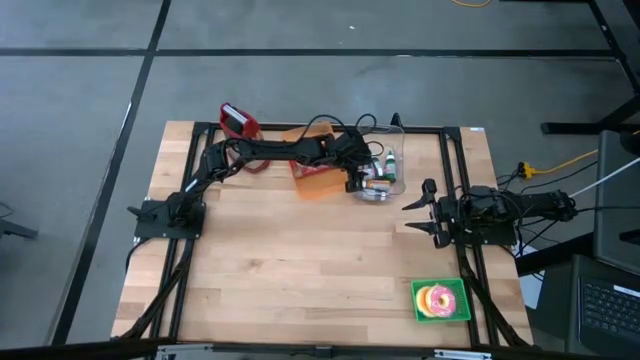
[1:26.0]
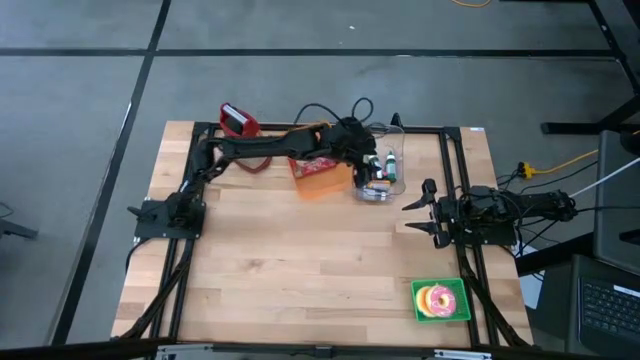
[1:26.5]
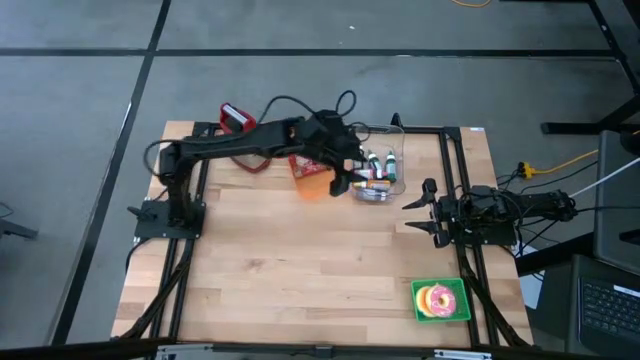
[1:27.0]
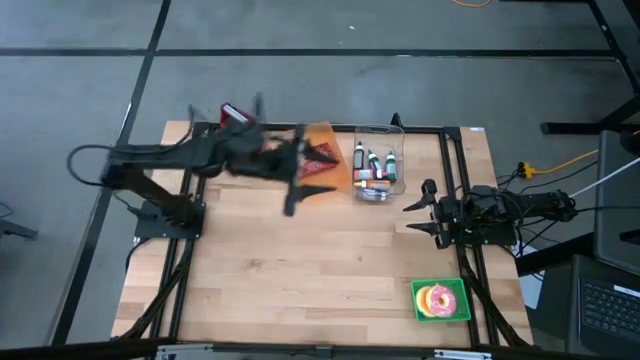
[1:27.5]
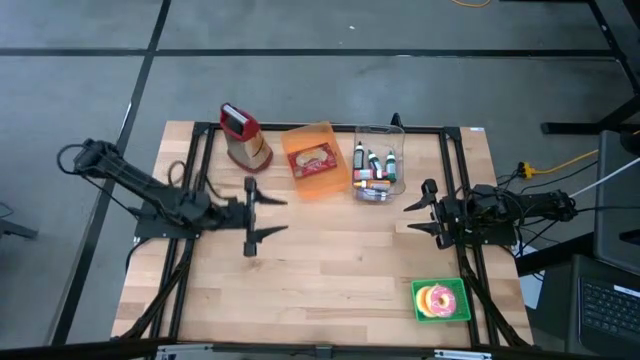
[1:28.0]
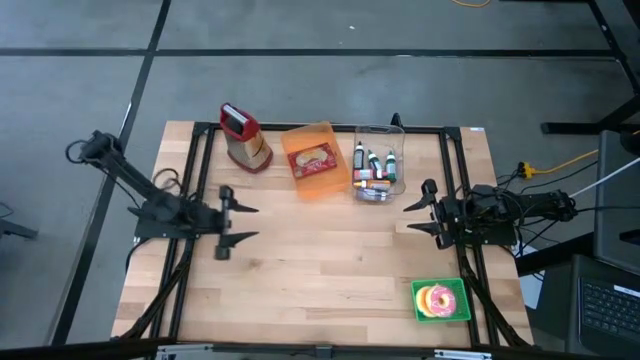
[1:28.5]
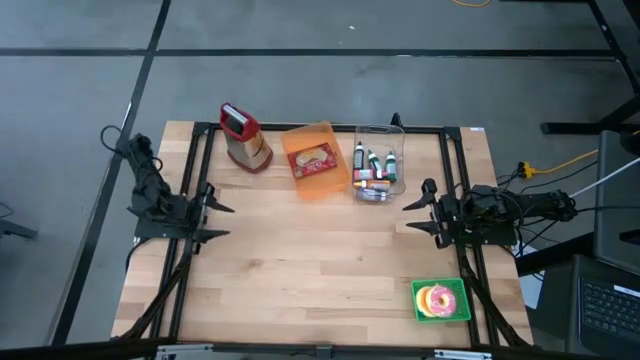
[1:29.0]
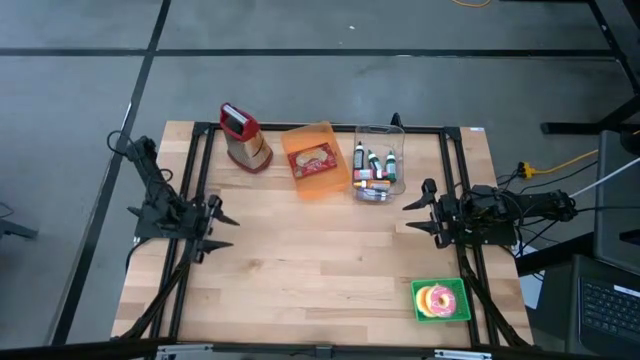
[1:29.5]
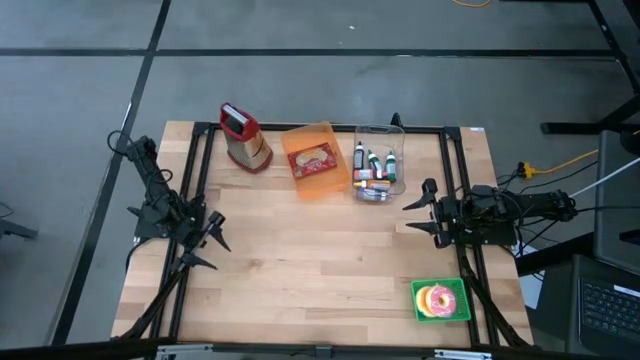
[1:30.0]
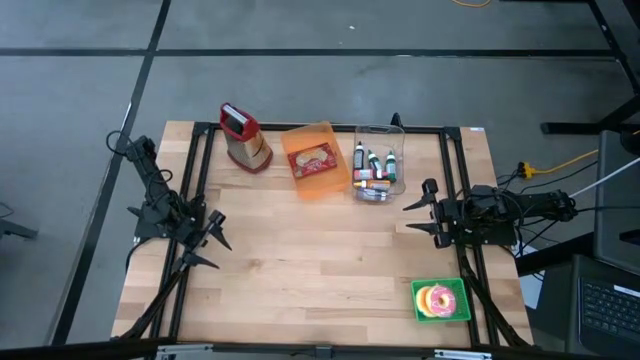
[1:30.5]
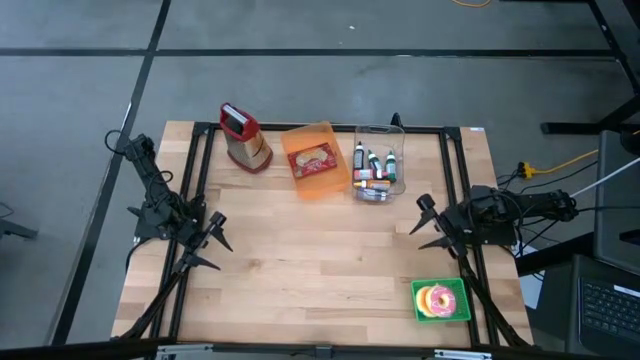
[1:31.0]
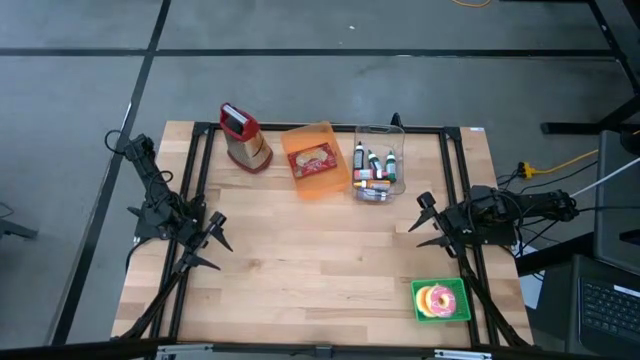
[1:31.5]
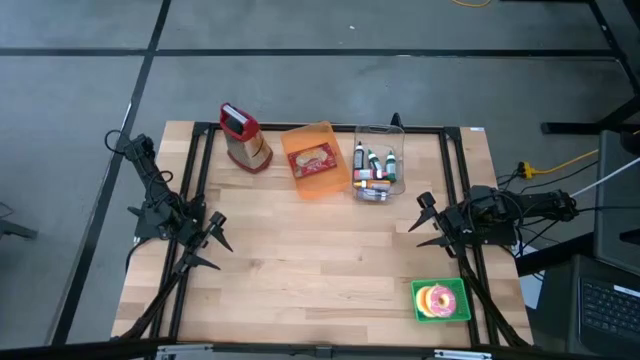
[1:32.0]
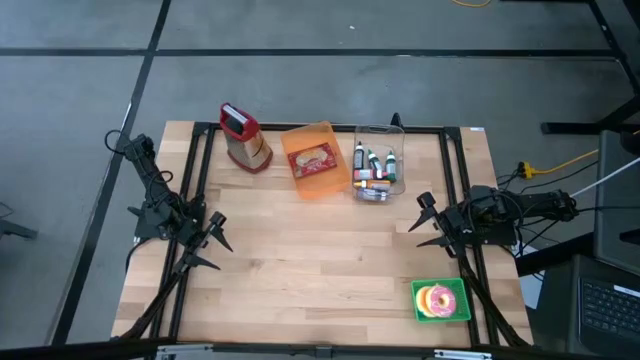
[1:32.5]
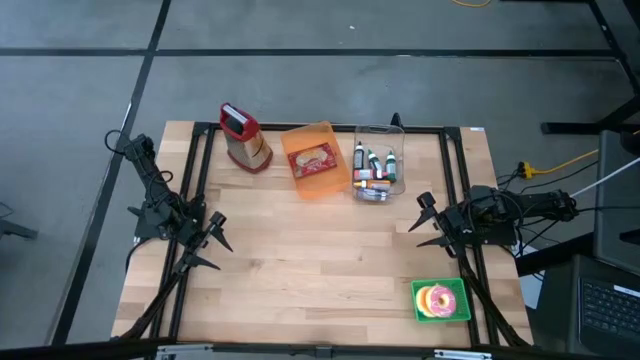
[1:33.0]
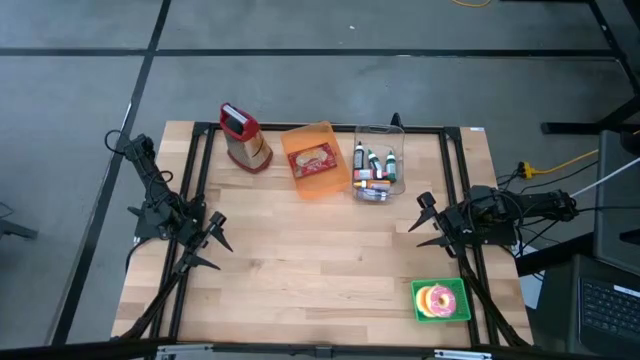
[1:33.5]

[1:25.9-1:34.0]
Return to Home Position

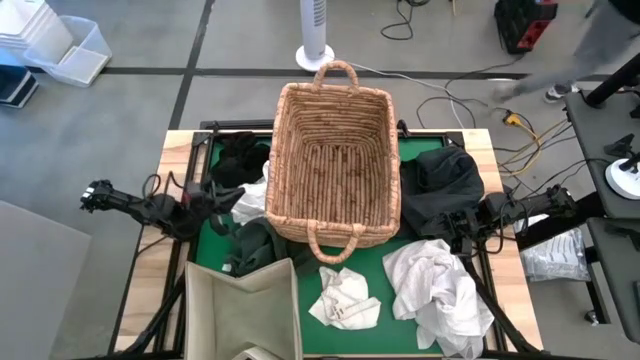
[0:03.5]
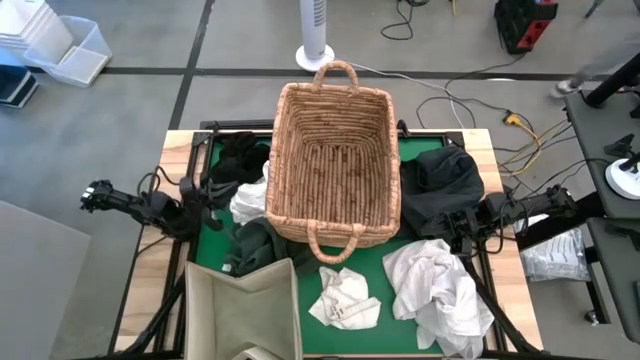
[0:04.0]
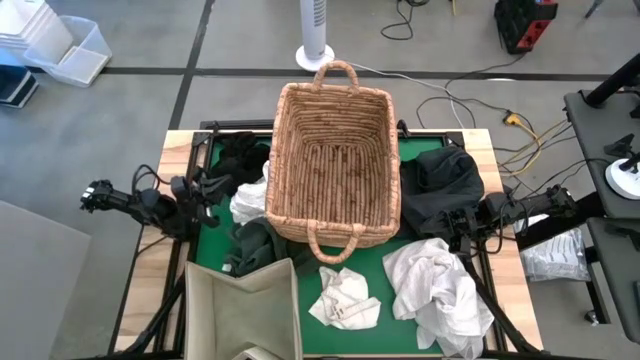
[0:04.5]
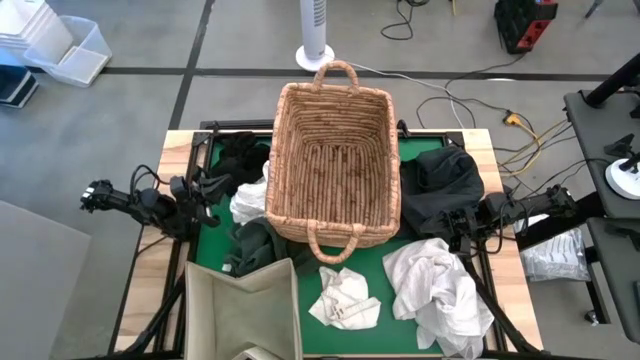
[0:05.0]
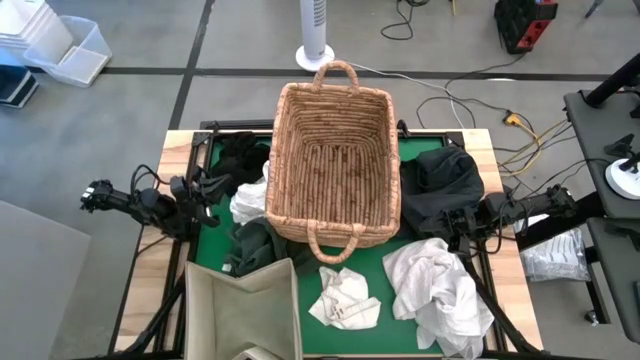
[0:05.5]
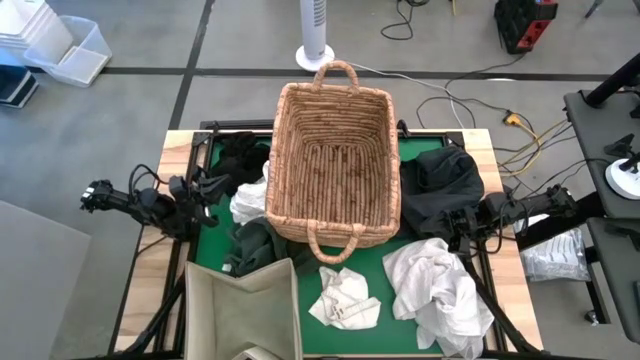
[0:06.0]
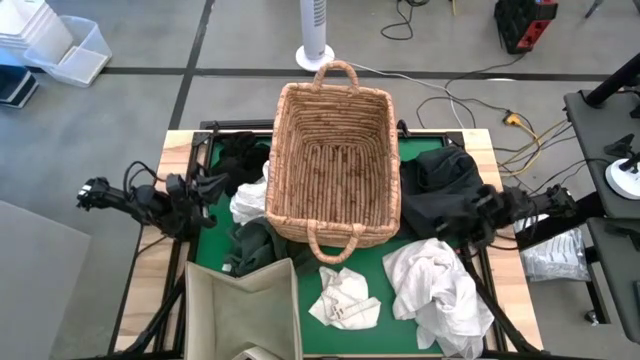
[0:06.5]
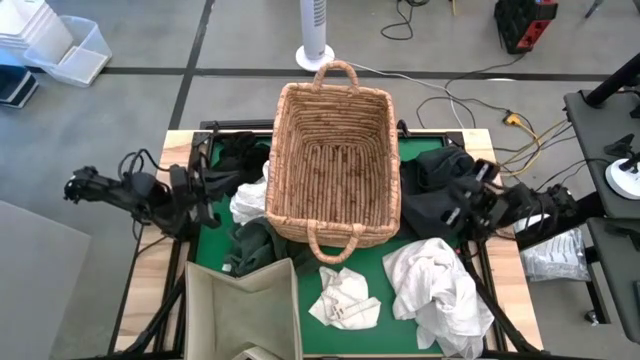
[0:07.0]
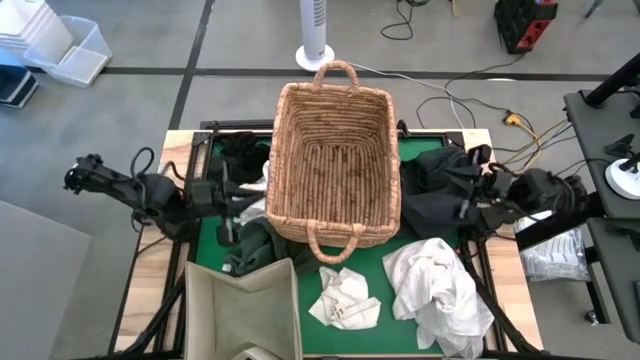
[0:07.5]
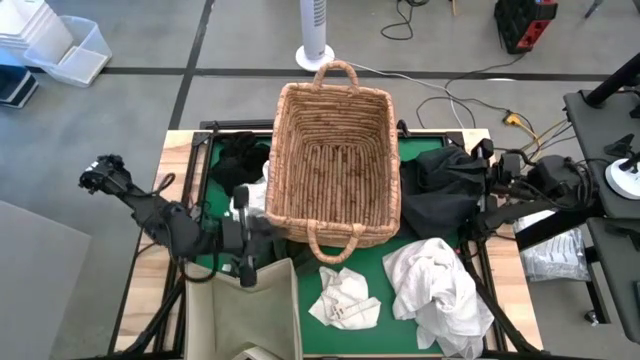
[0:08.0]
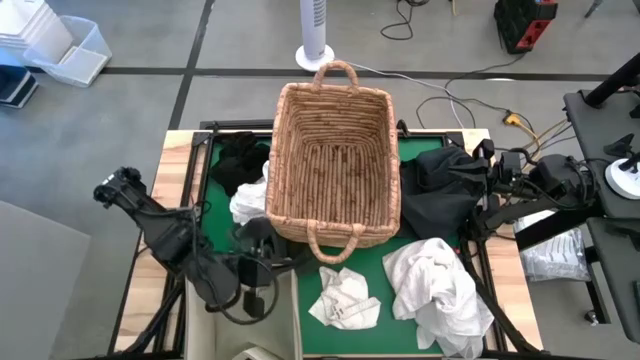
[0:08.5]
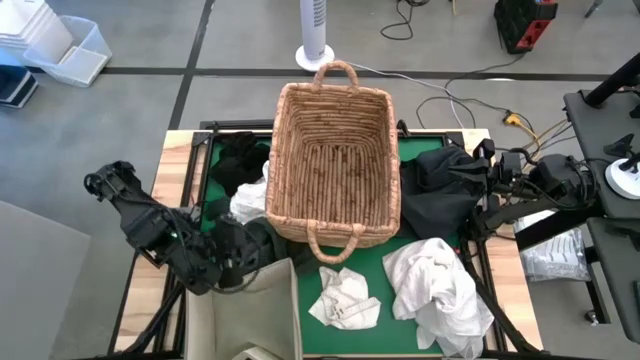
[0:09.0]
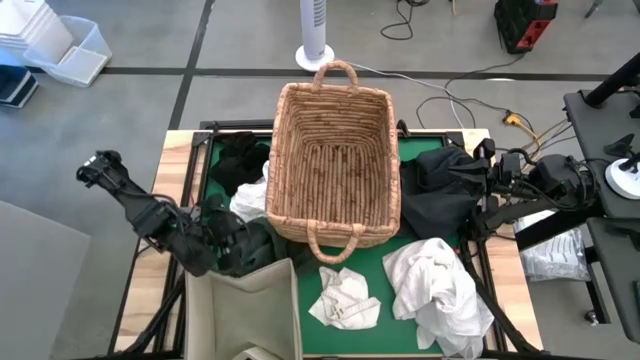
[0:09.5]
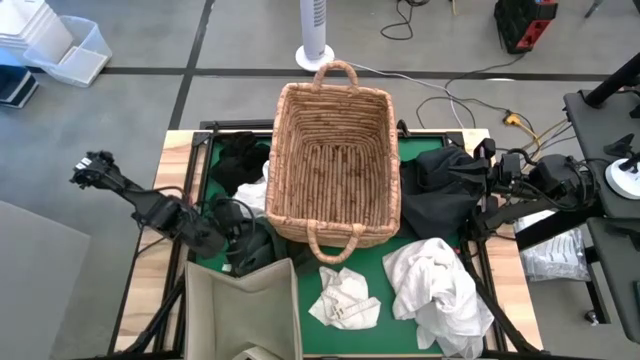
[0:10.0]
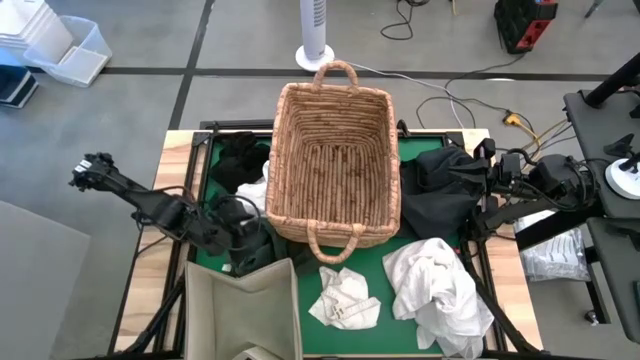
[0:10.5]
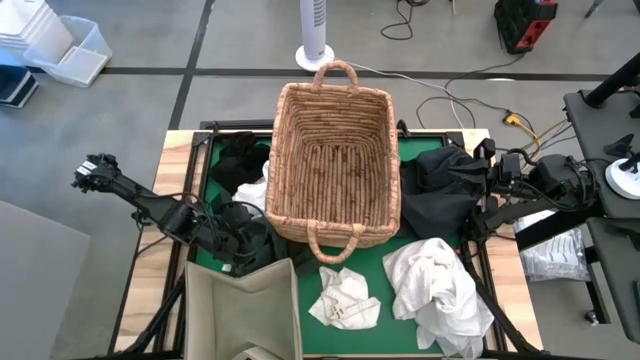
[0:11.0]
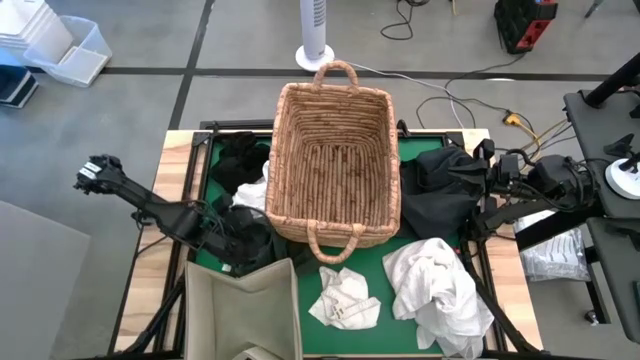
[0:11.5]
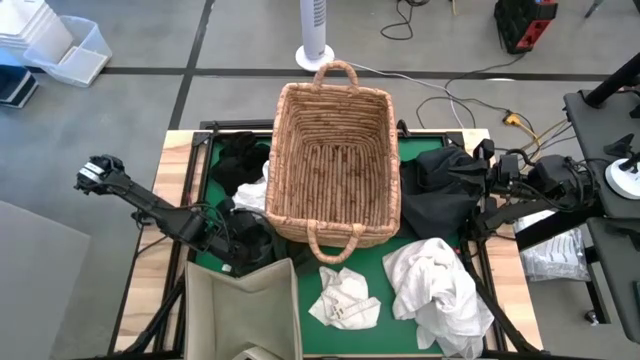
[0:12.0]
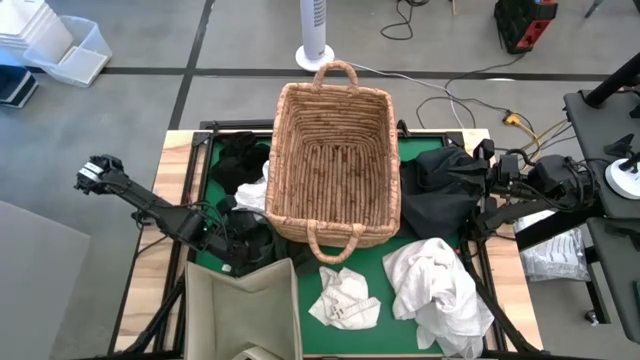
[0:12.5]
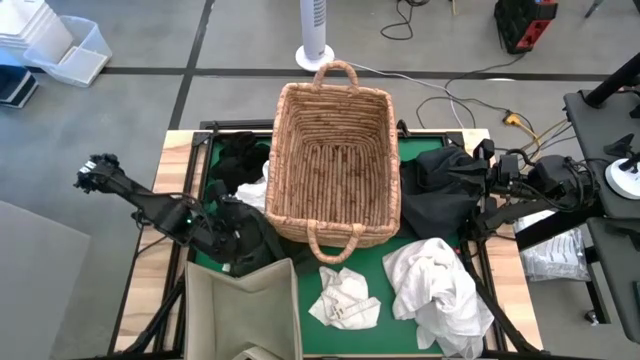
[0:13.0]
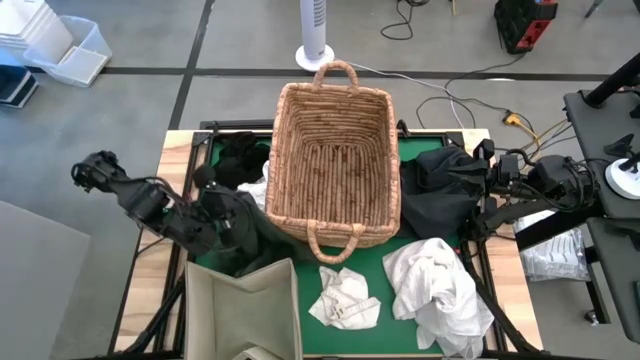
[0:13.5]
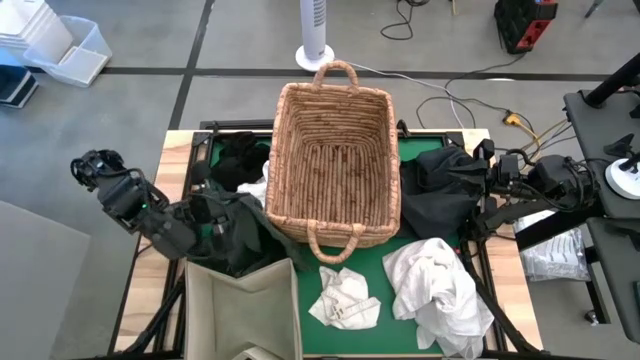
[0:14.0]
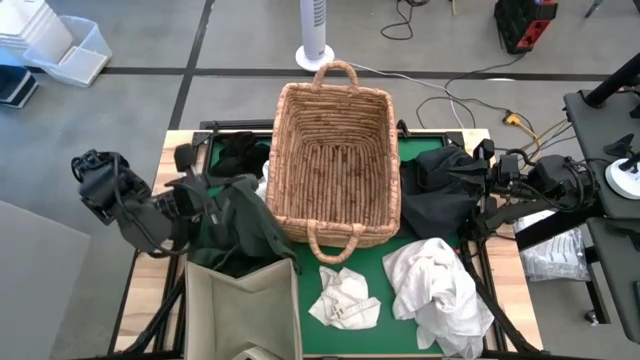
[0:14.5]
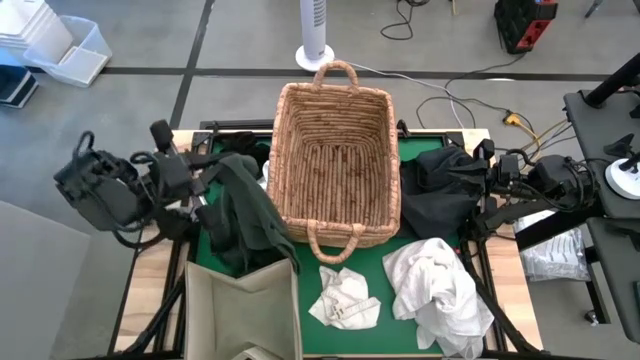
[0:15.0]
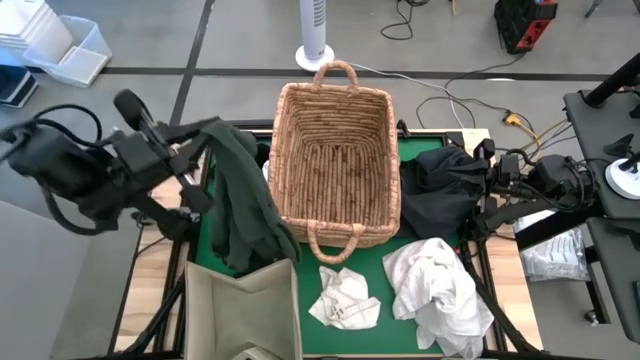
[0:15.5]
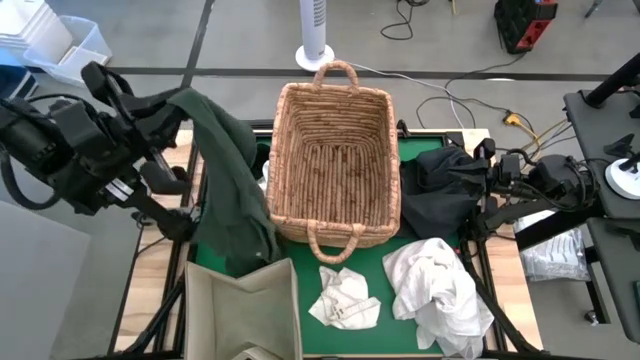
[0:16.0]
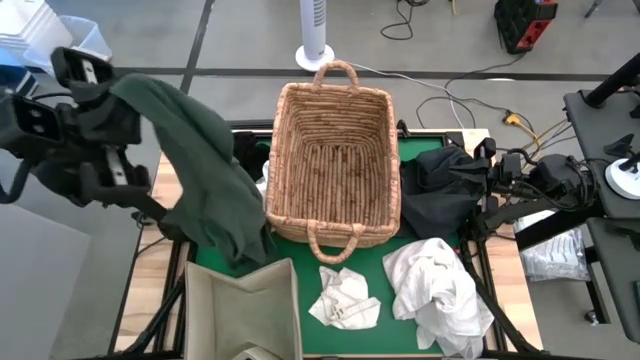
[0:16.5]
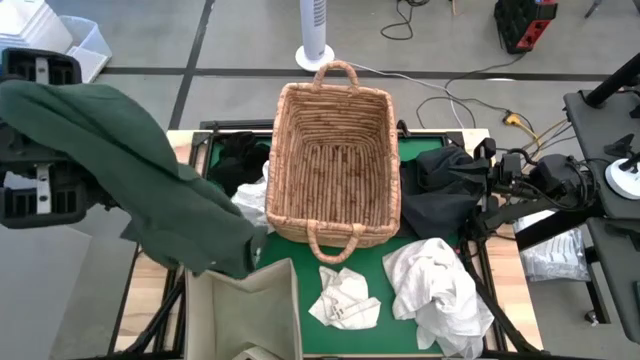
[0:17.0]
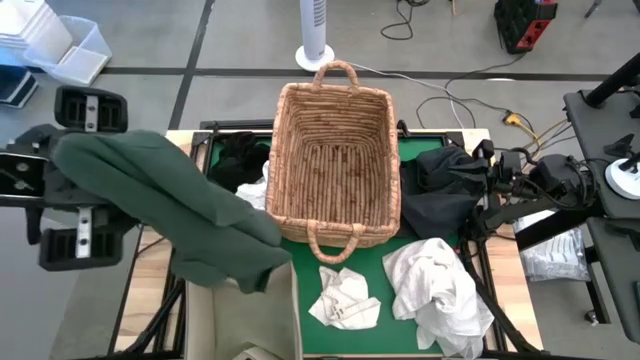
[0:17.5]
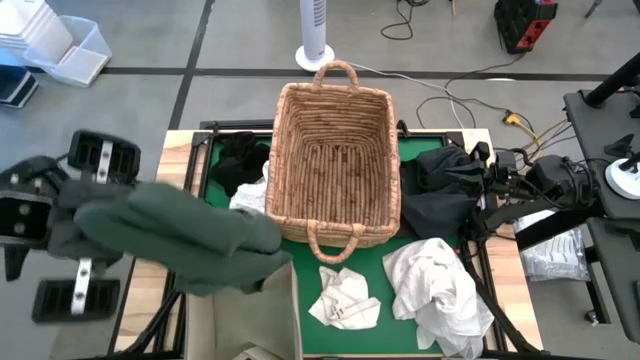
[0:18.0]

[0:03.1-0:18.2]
Put the green shirt into the gray laundry bin
